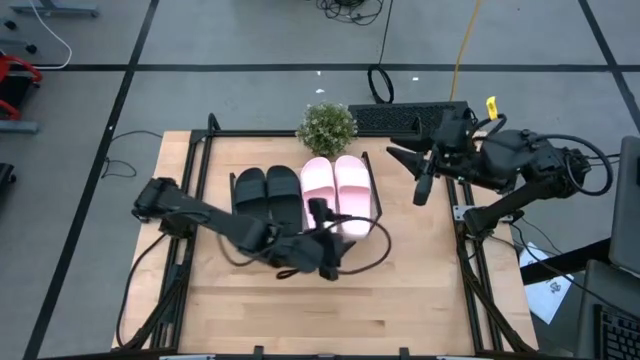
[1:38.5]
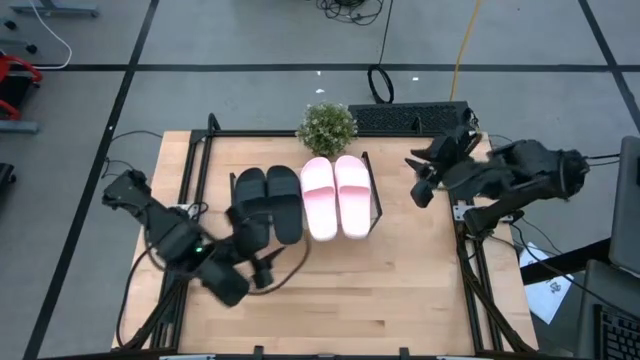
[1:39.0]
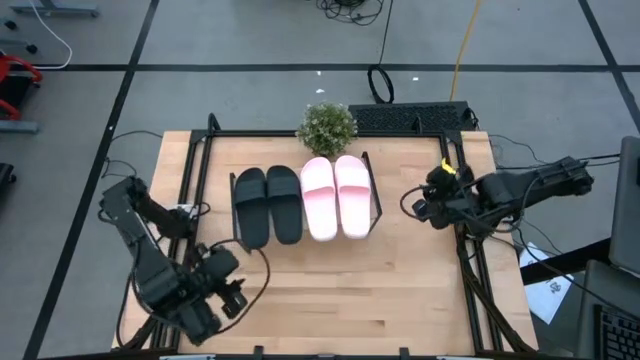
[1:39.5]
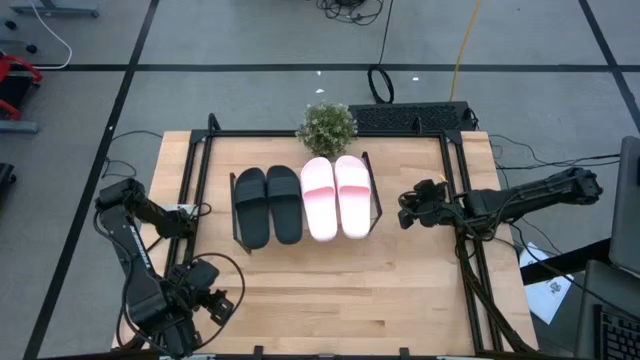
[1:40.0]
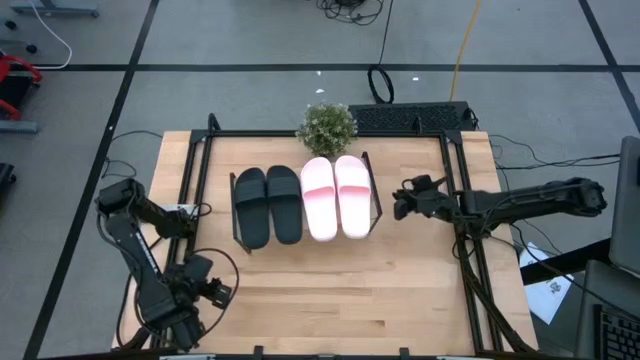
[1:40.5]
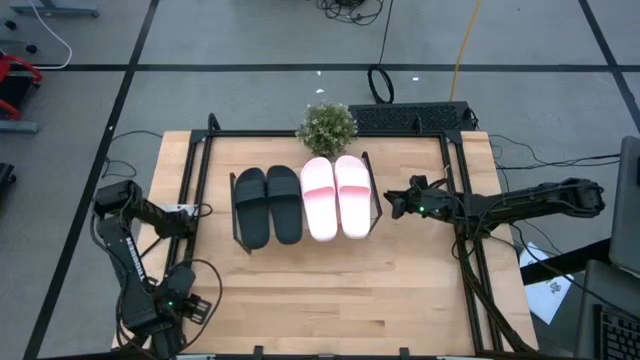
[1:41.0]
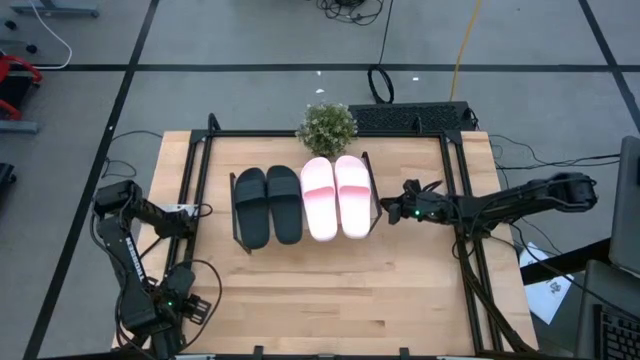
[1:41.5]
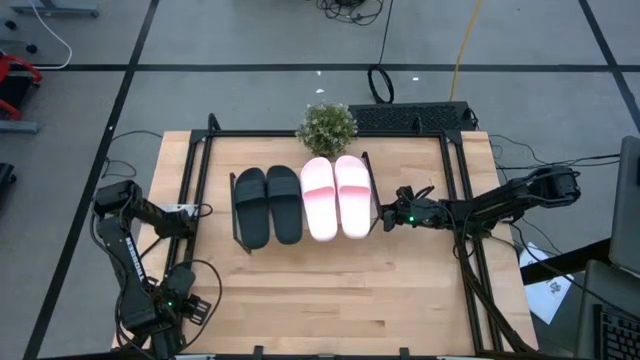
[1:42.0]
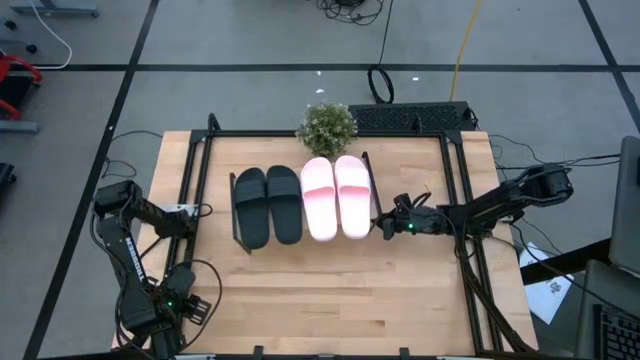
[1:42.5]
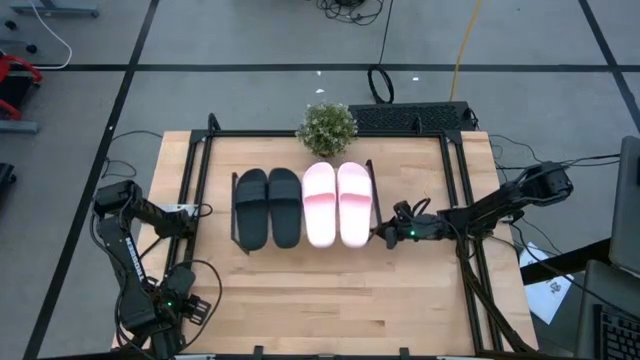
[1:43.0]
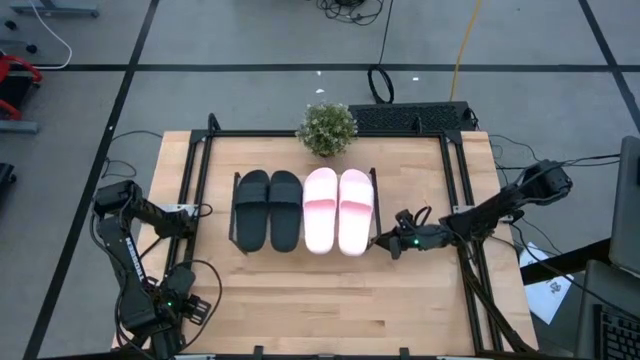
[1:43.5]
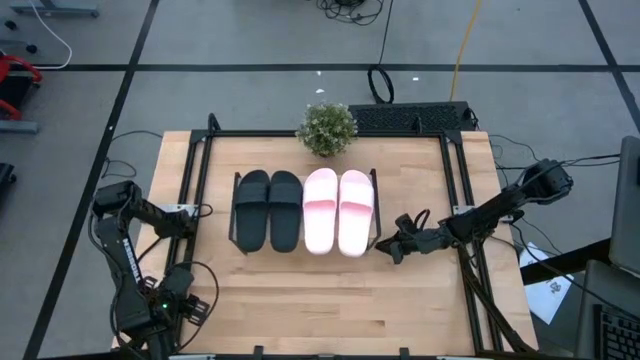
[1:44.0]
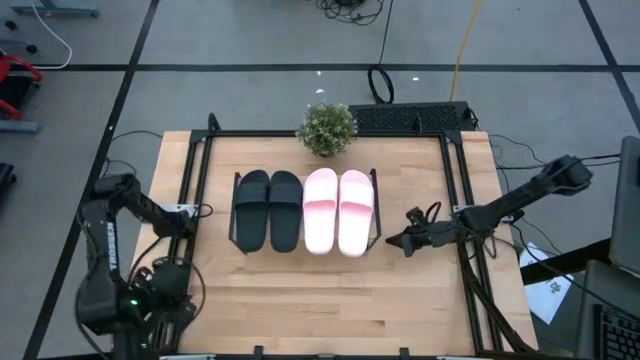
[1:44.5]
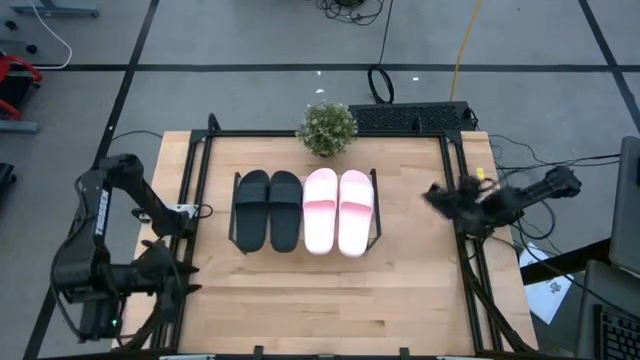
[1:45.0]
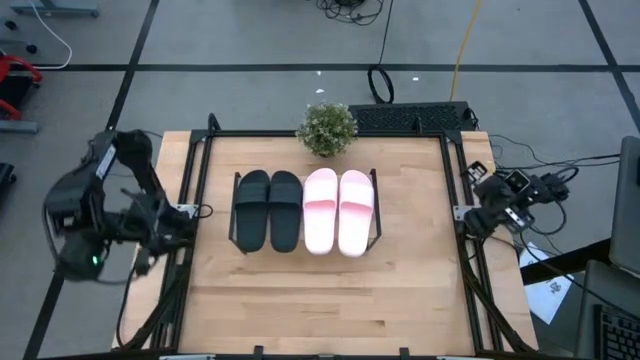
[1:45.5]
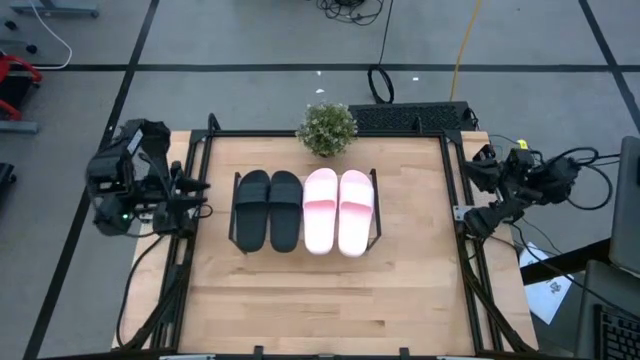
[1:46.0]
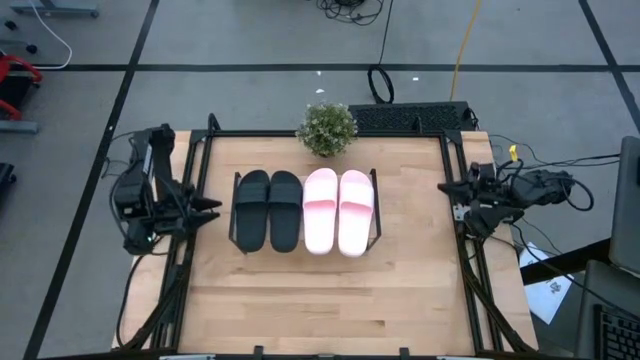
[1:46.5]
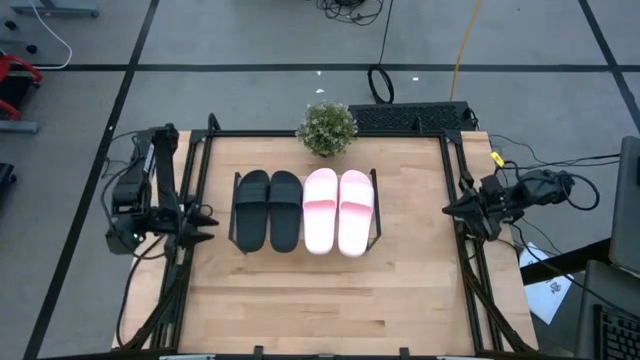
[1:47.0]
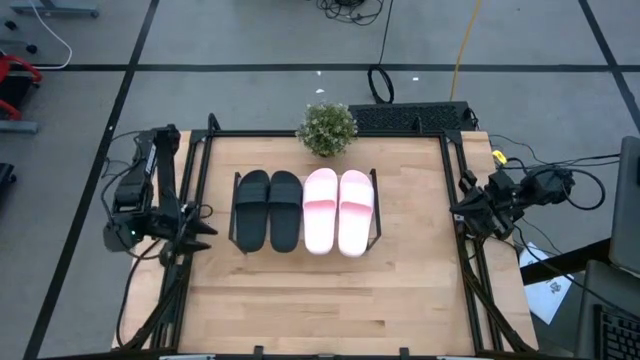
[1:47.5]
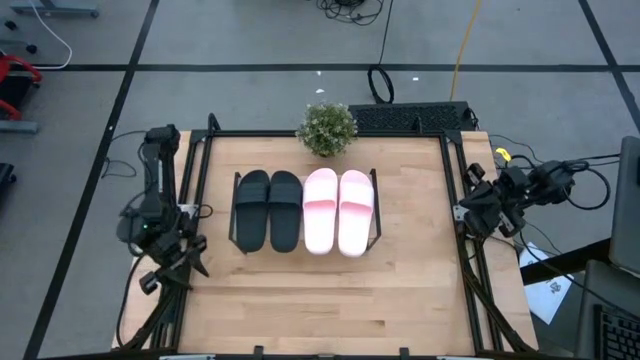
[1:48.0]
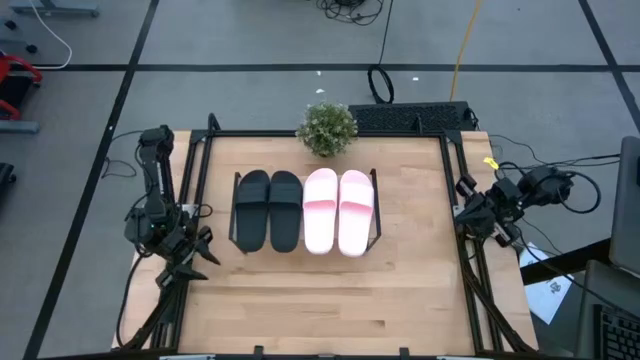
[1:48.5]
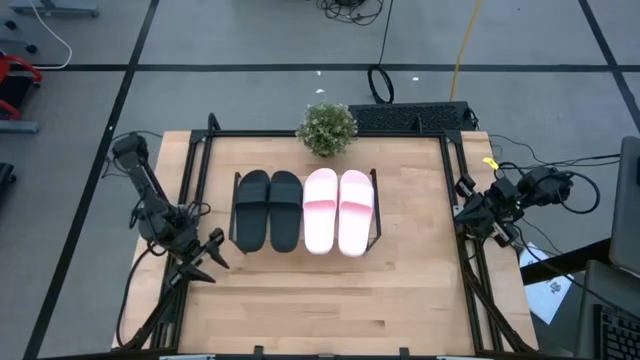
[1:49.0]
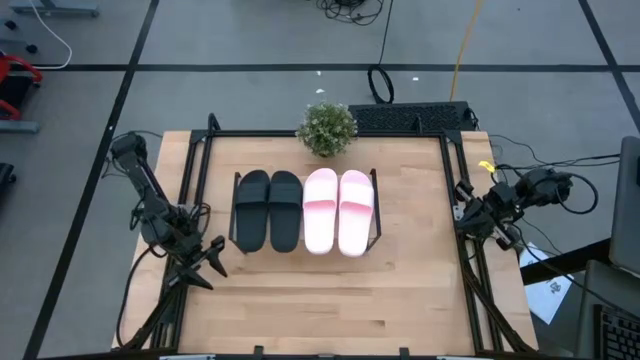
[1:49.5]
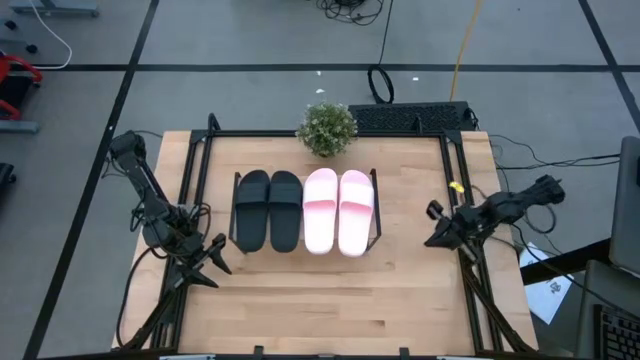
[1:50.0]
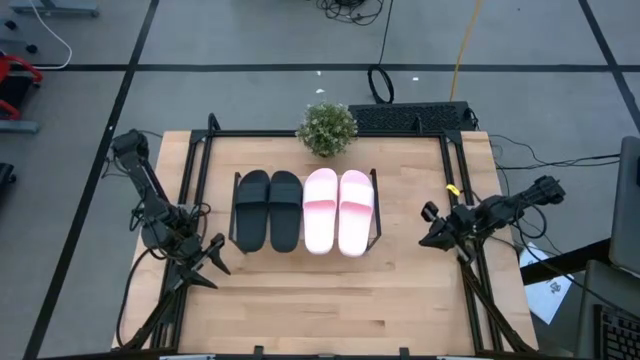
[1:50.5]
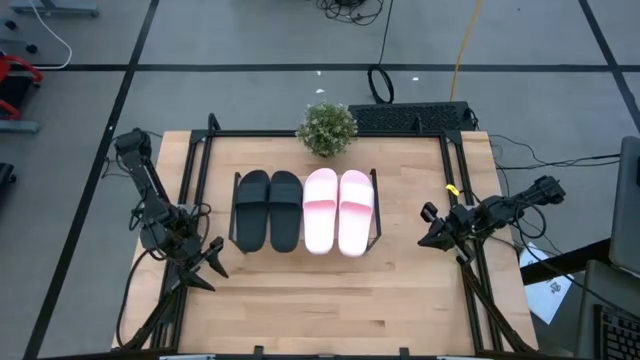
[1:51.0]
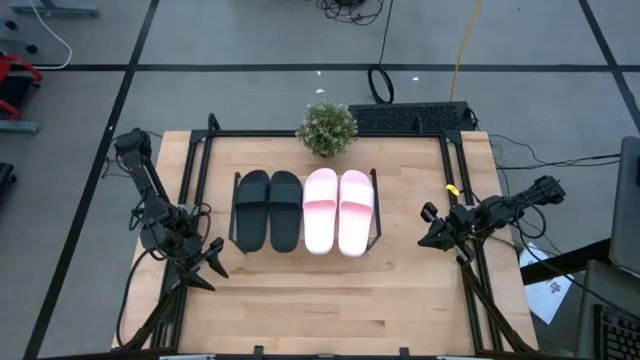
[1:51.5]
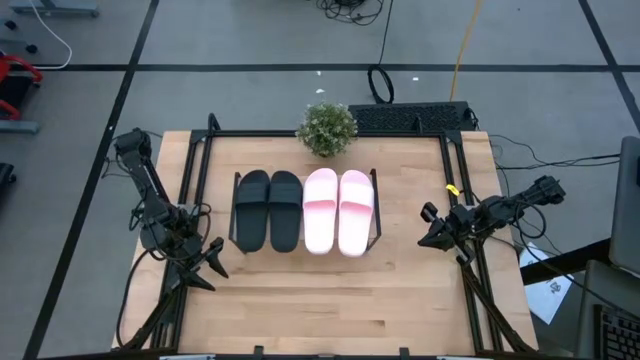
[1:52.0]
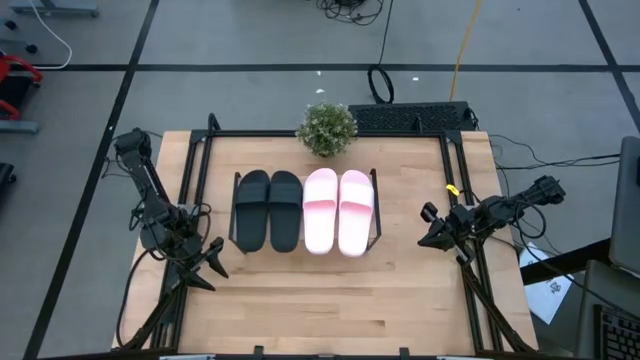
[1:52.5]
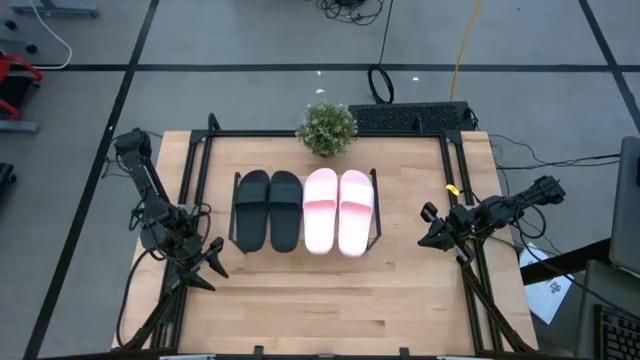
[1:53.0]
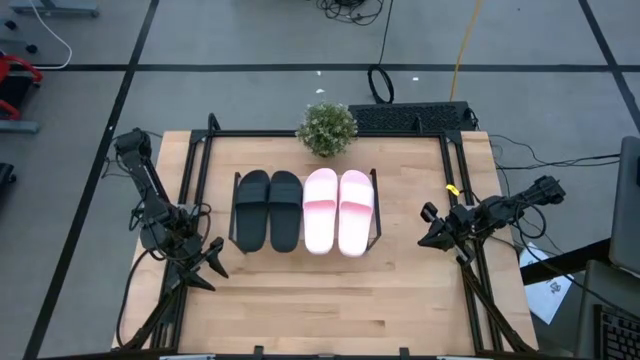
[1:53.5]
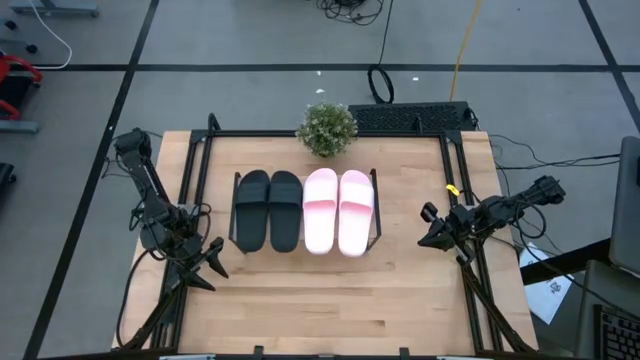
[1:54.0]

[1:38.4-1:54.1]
Task: Pick and place slides into the shelf
Return to Home Position

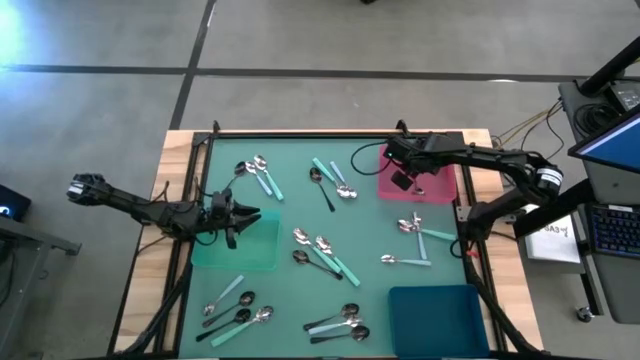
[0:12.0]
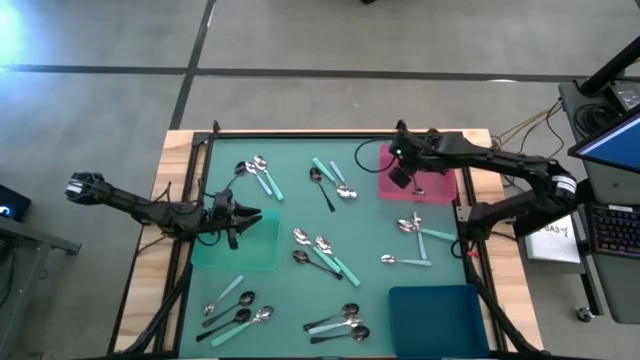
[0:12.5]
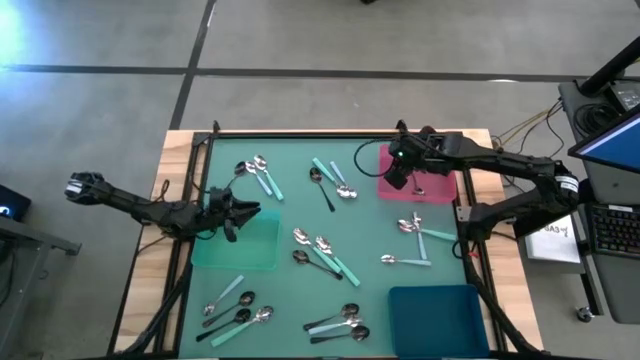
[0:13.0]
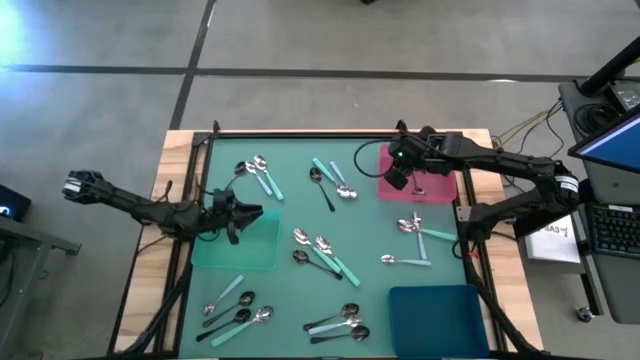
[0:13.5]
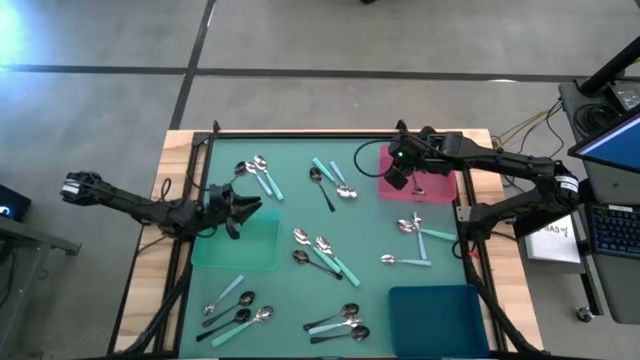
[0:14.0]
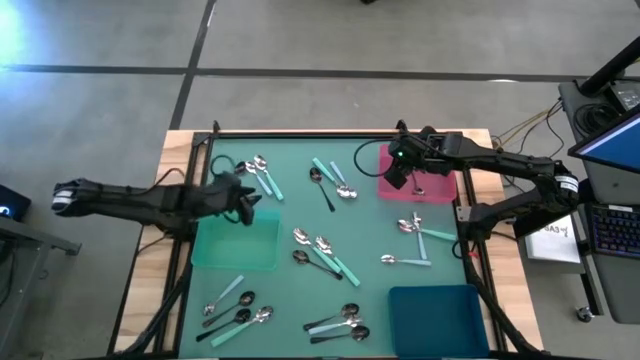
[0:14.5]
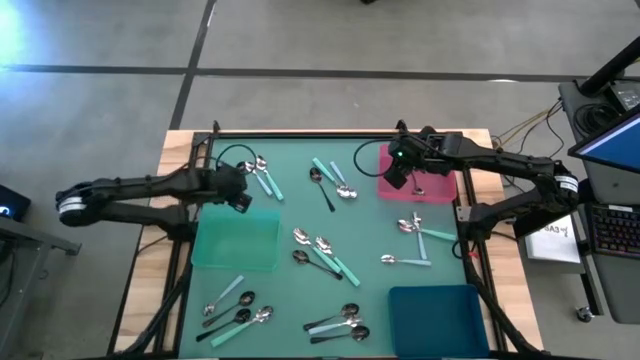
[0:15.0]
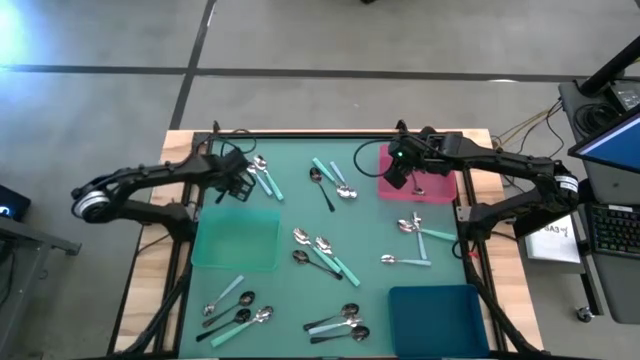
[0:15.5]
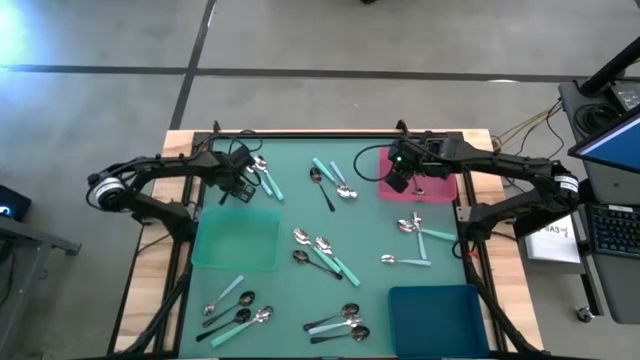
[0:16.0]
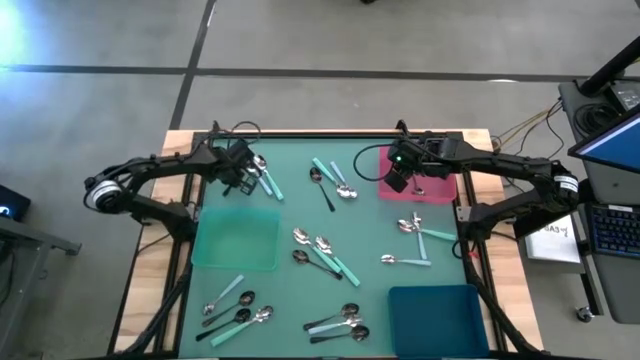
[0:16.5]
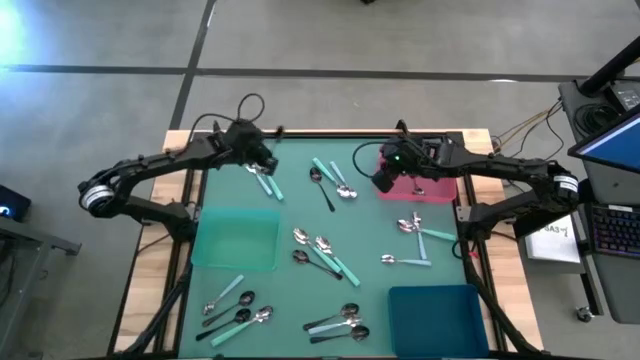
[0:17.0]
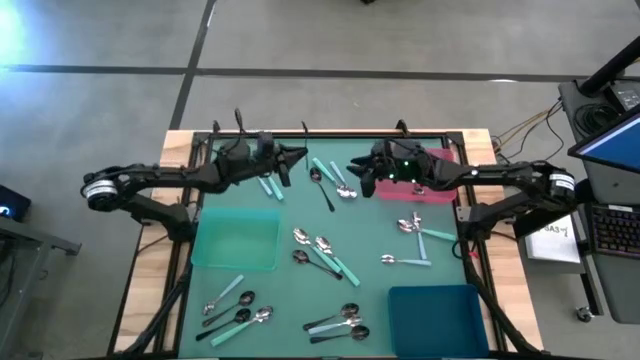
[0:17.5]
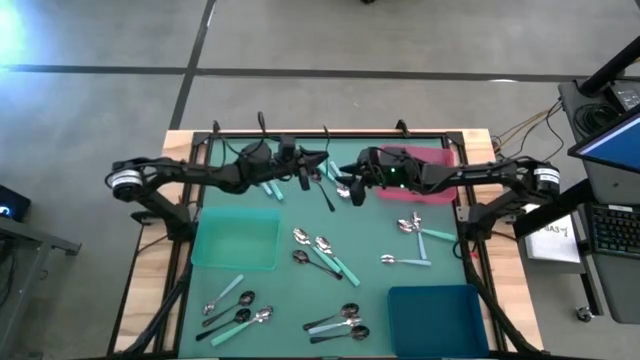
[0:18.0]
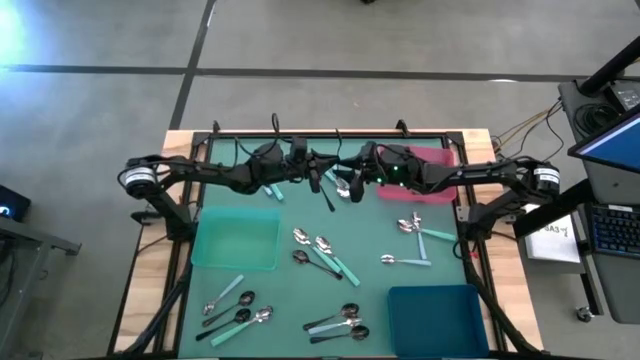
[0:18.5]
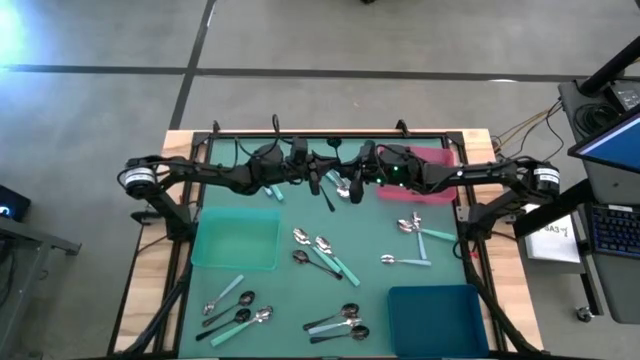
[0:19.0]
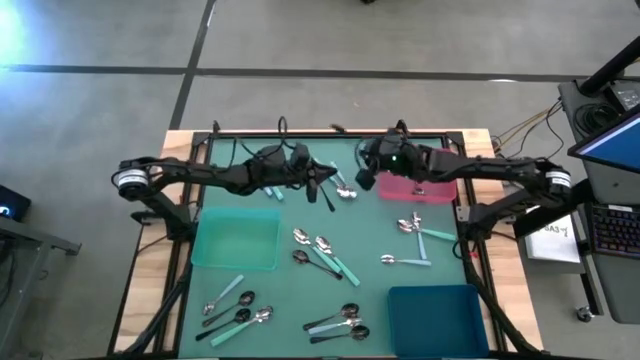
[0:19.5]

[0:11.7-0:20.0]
Task: Sort silverware by color (type)
Put the black spoon into the red bin
